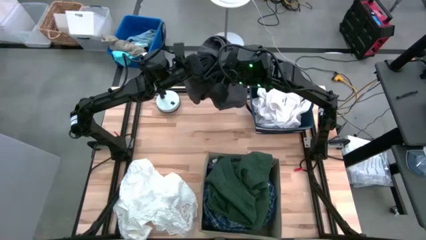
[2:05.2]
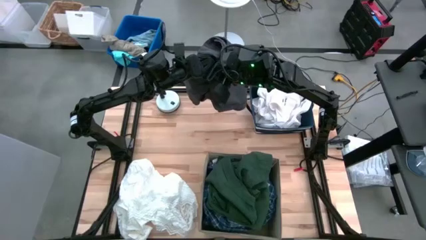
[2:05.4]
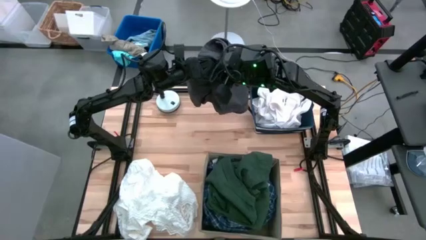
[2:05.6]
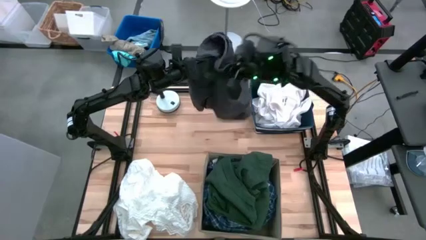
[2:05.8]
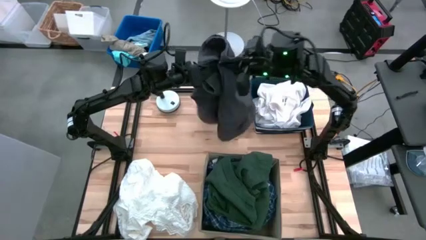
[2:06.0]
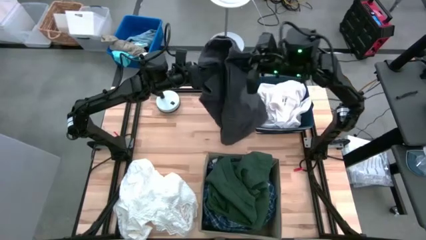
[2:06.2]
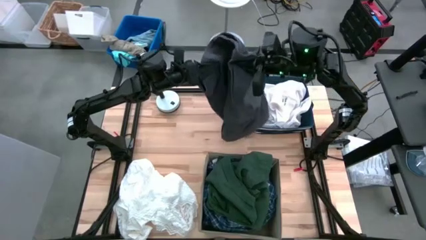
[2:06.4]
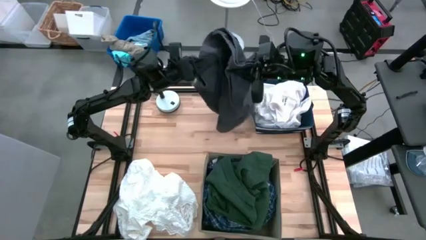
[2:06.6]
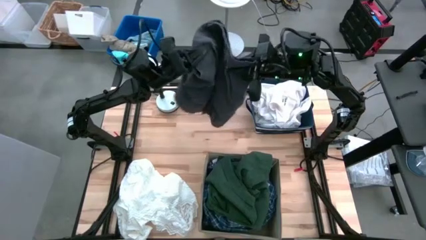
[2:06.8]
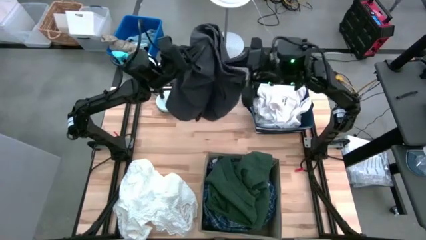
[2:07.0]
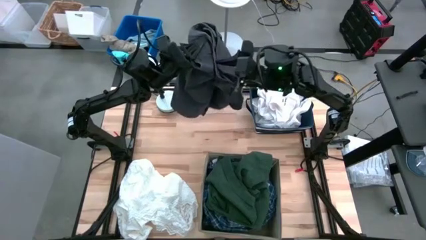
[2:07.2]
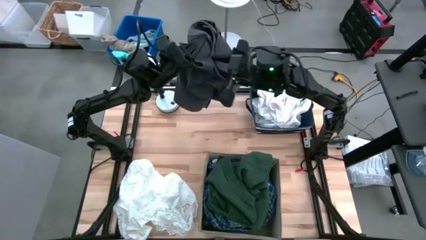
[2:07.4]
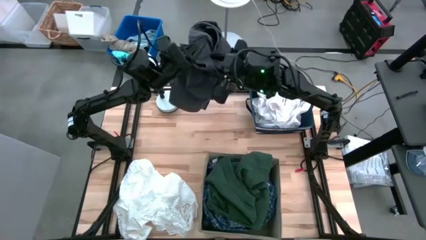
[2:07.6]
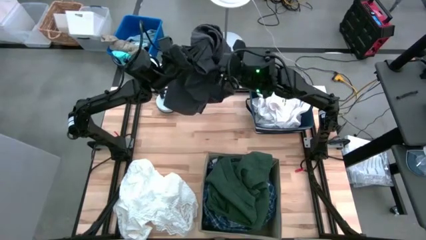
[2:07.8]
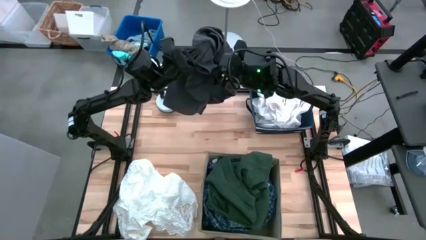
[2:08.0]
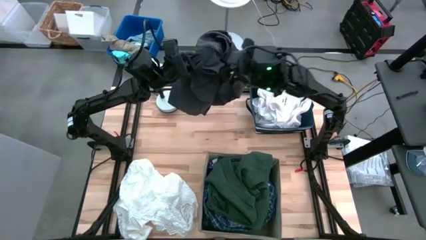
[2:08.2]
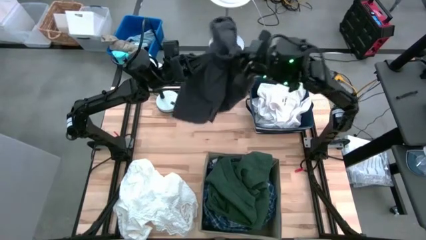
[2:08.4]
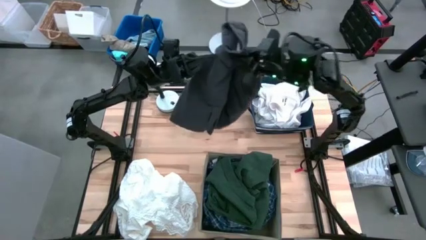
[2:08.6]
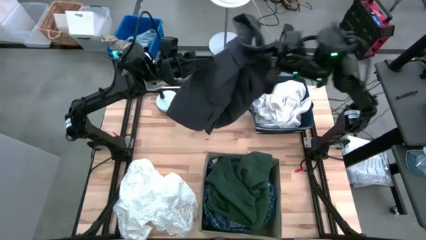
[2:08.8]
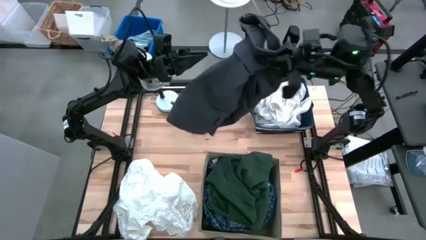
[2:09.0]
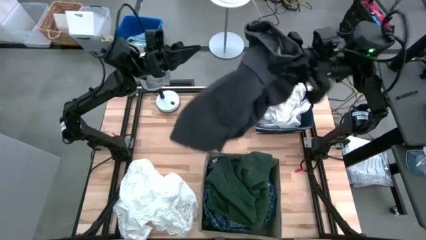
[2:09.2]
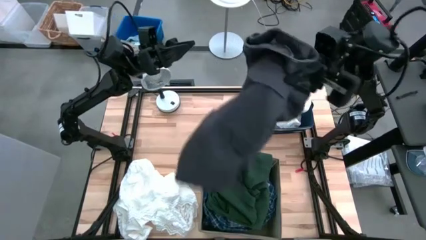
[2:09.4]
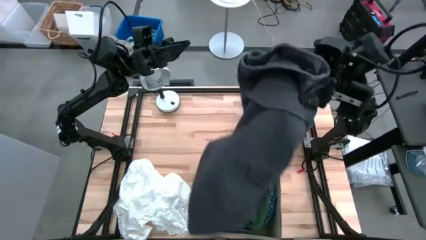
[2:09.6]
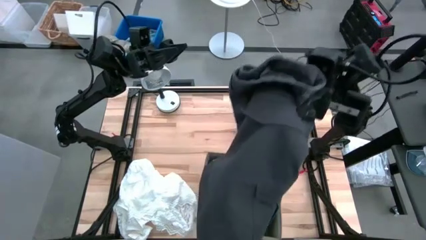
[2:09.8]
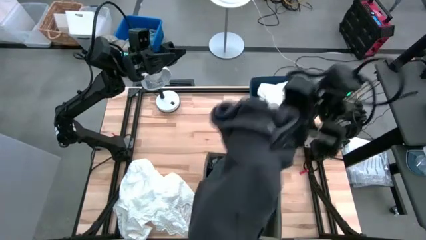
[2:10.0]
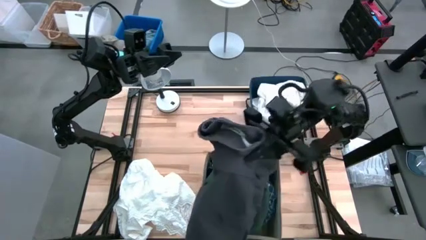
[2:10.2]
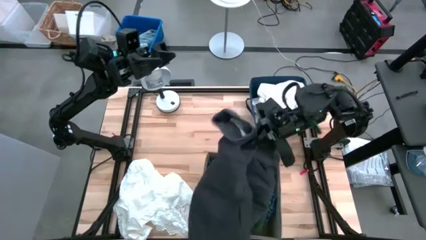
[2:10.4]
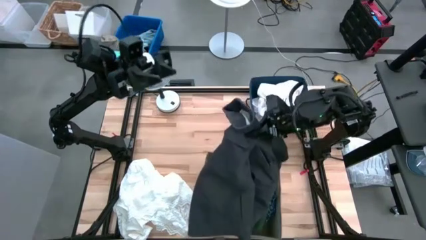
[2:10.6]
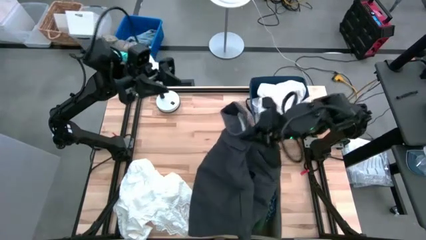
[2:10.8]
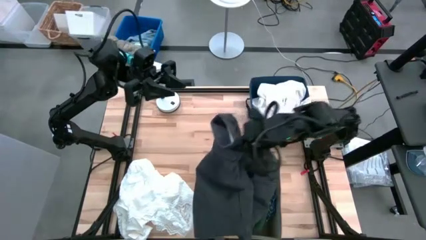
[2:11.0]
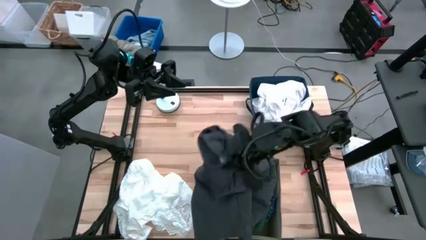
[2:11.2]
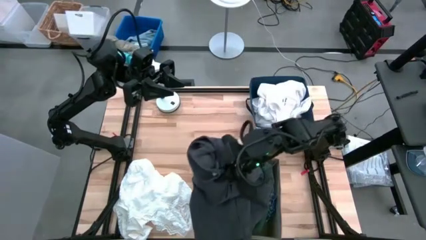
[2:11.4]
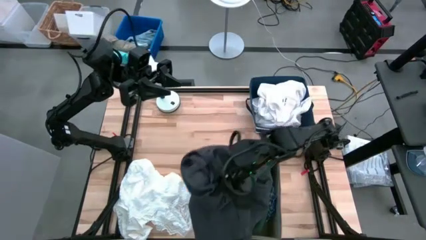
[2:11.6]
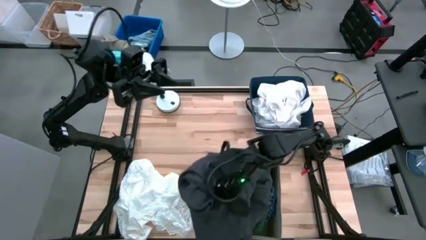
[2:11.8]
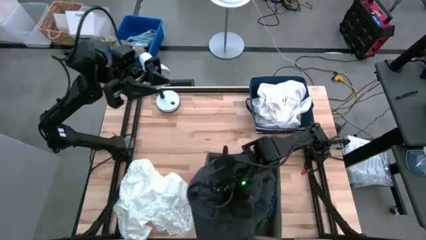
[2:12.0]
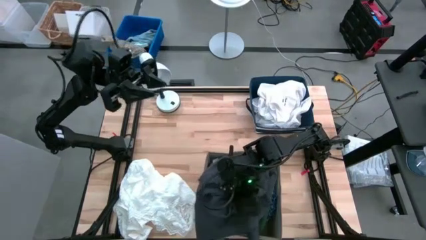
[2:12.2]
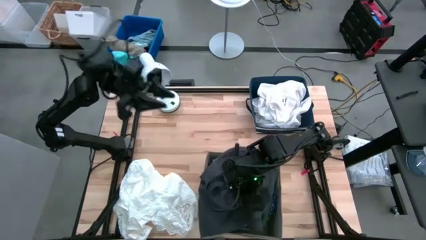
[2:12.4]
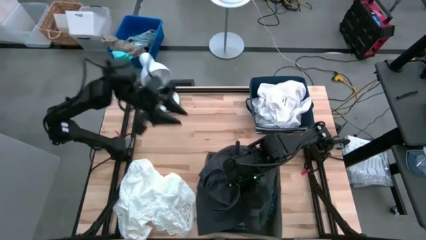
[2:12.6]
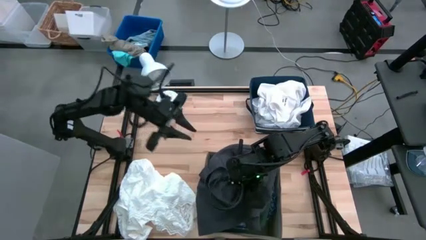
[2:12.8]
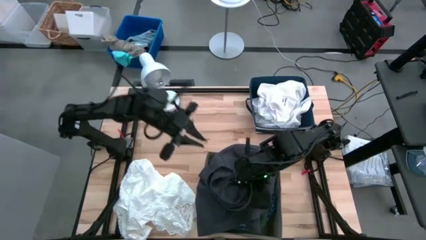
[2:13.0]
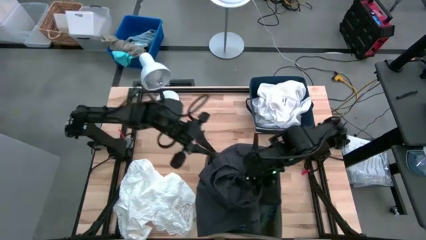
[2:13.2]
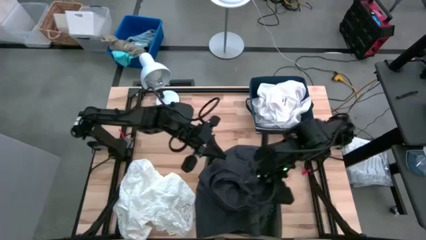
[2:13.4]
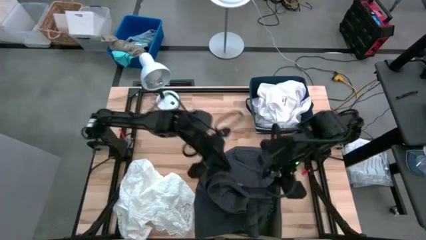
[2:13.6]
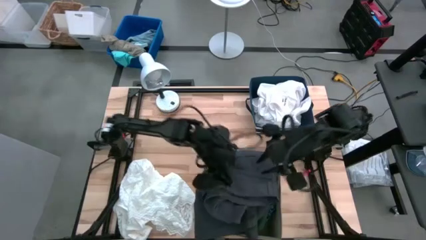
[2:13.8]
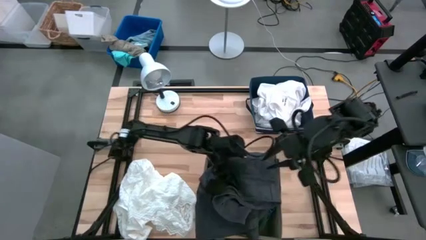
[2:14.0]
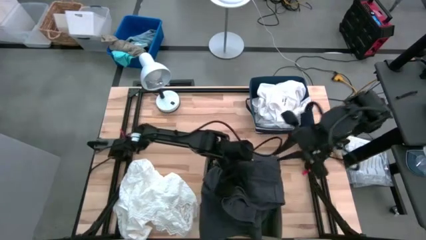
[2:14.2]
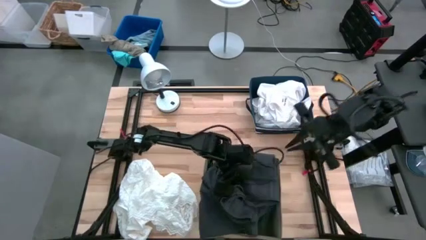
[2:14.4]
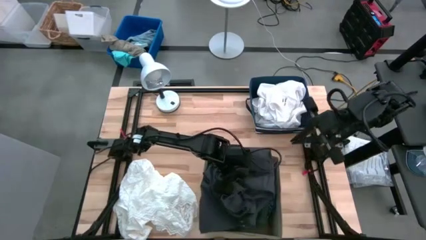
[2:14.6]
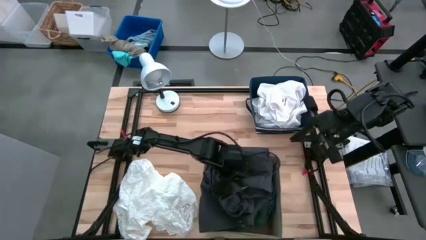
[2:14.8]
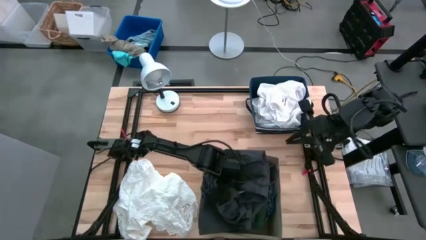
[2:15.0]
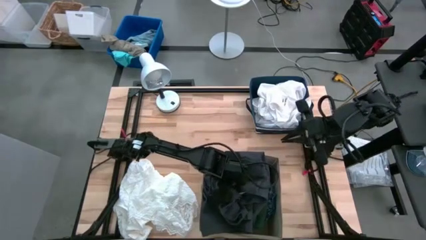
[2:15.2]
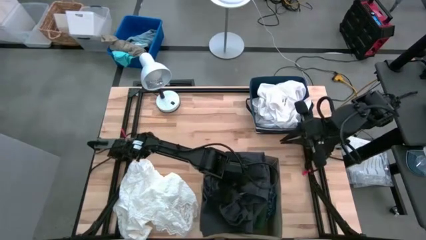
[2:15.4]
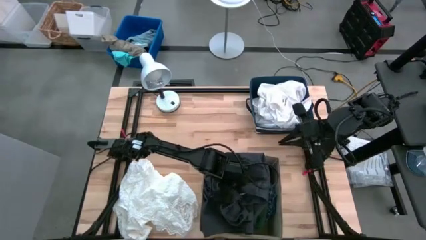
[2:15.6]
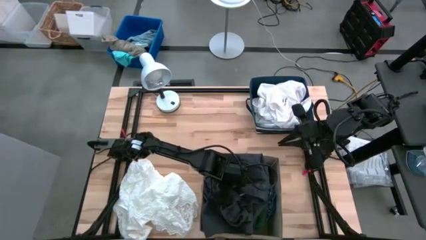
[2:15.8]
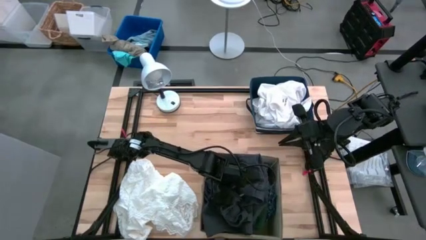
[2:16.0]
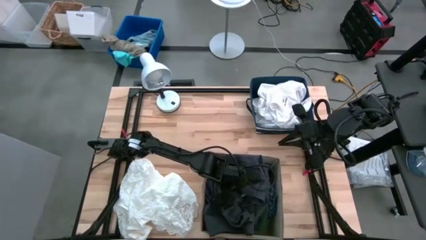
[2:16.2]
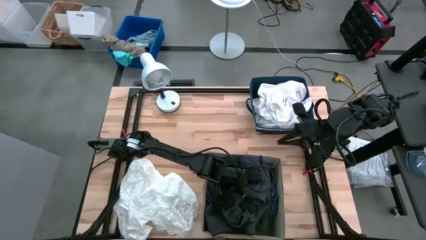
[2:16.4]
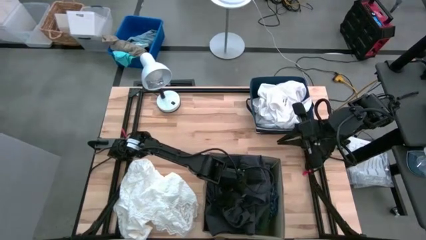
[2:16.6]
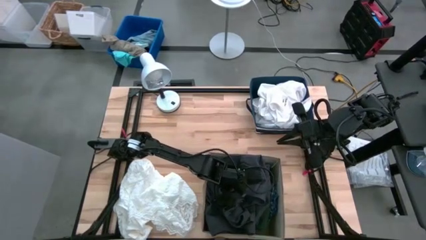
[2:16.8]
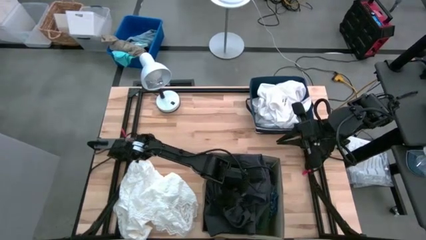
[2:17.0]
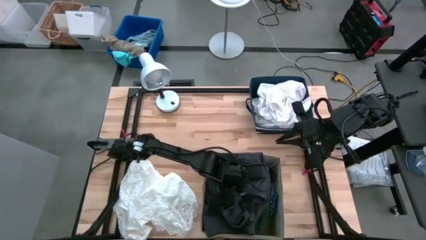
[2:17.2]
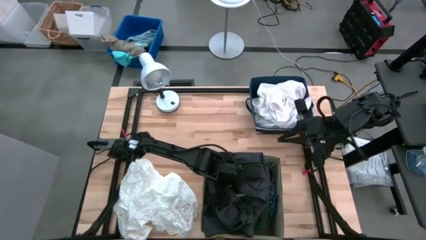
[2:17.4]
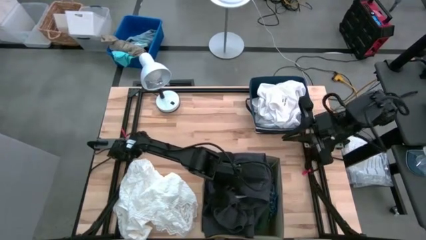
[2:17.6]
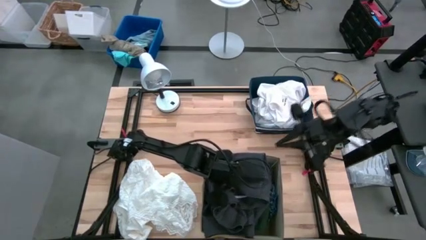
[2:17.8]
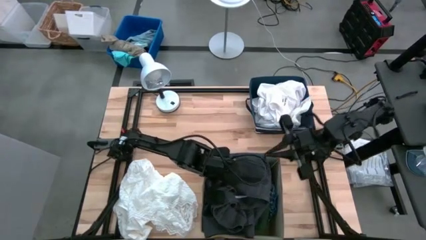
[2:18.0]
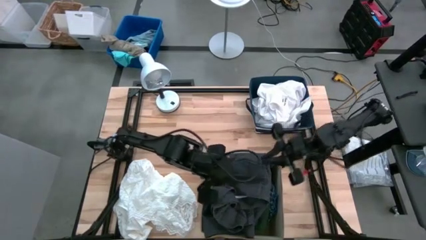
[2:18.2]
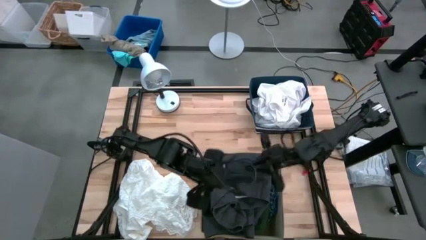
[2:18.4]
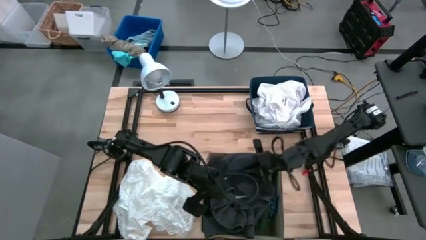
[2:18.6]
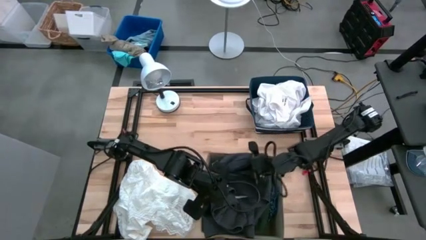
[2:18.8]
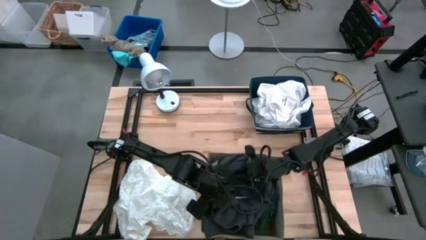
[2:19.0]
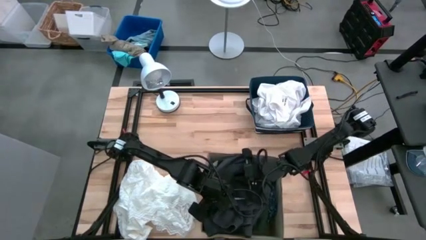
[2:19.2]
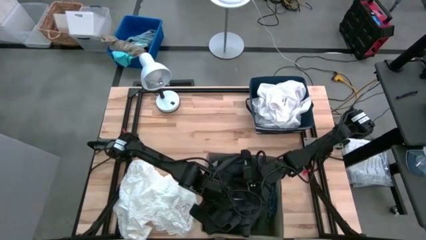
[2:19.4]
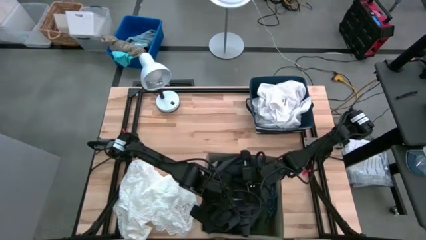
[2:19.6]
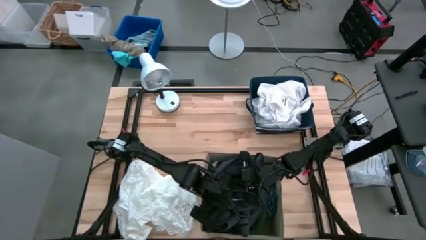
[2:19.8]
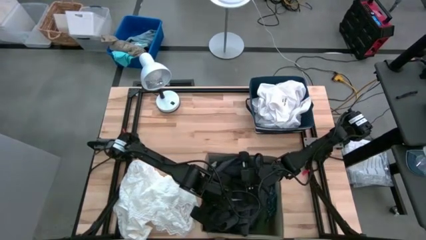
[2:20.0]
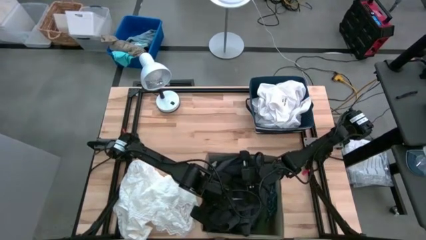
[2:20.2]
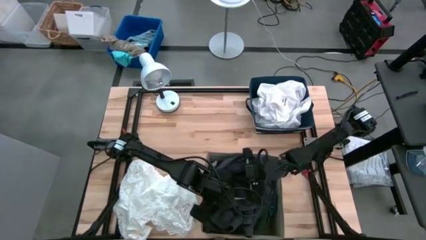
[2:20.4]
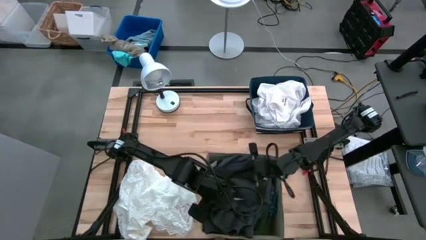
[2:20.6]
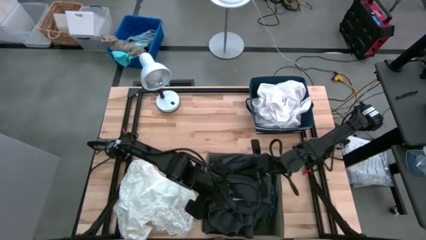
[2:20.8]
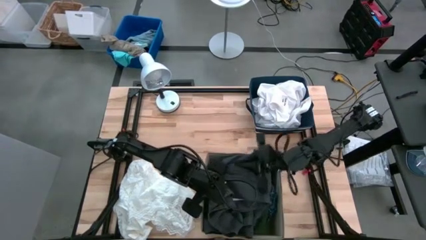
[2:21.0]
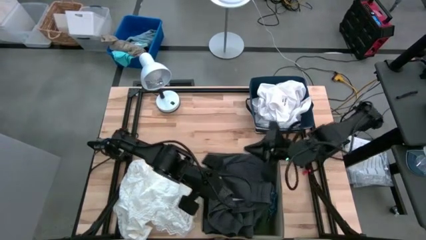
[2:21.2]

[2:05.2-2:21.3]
Task: Sort clothes
Put the gray shorts into the brown laundry organizer
